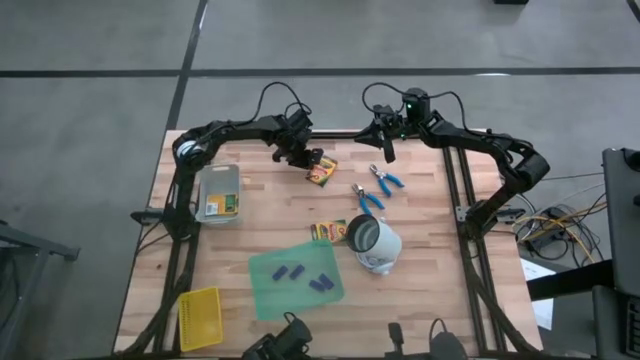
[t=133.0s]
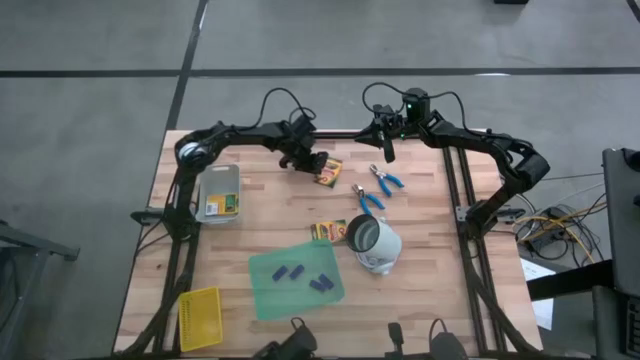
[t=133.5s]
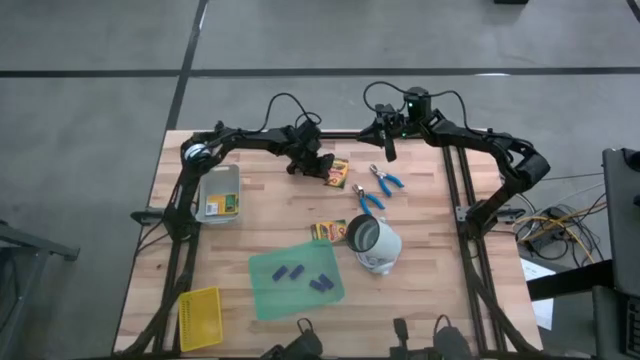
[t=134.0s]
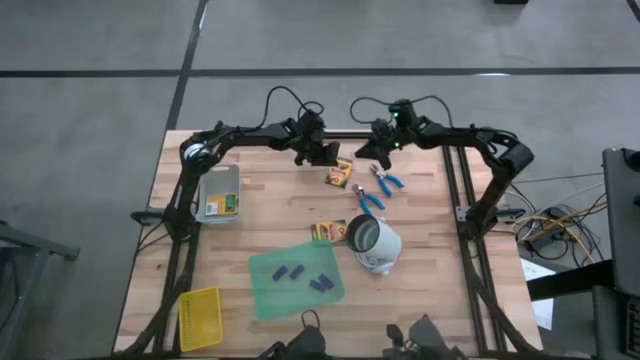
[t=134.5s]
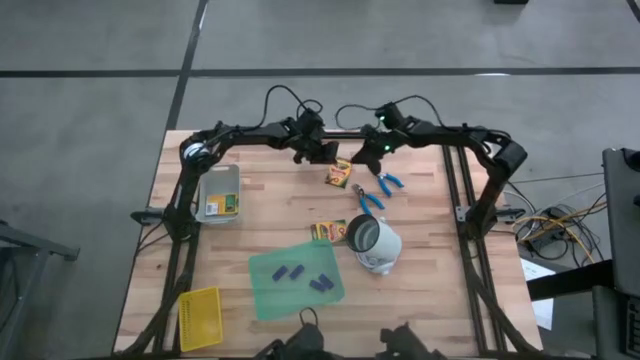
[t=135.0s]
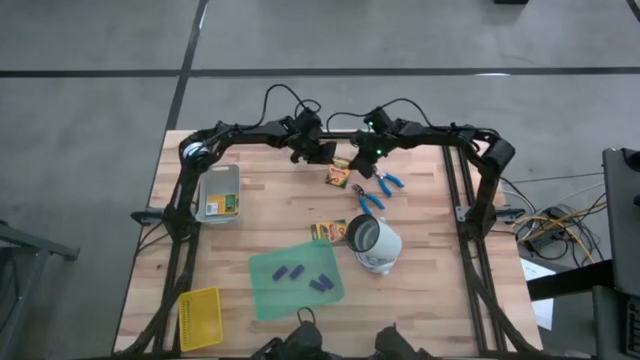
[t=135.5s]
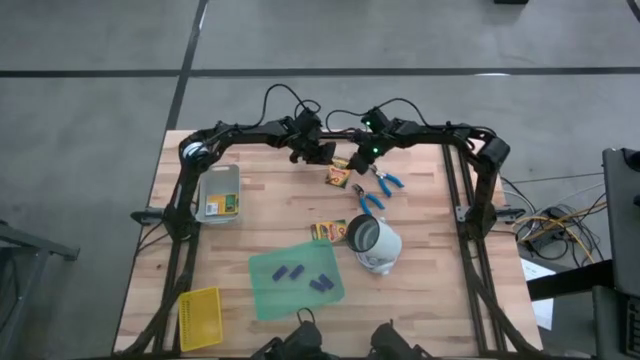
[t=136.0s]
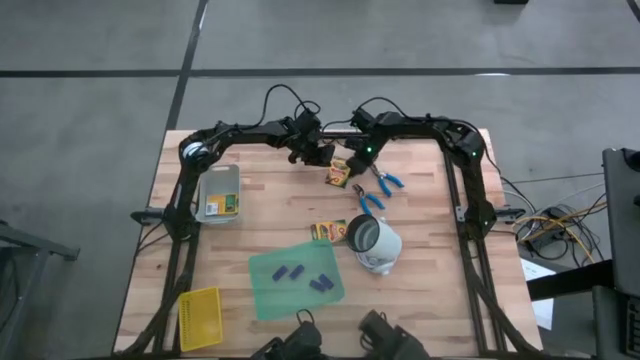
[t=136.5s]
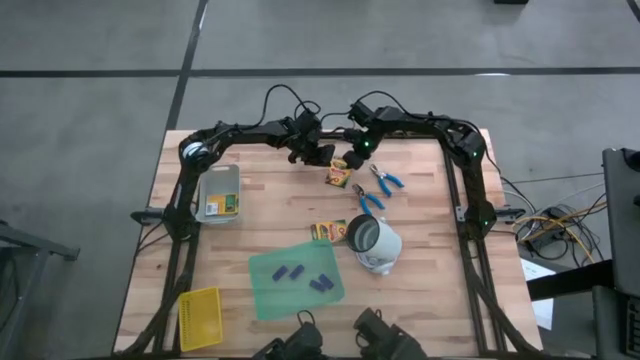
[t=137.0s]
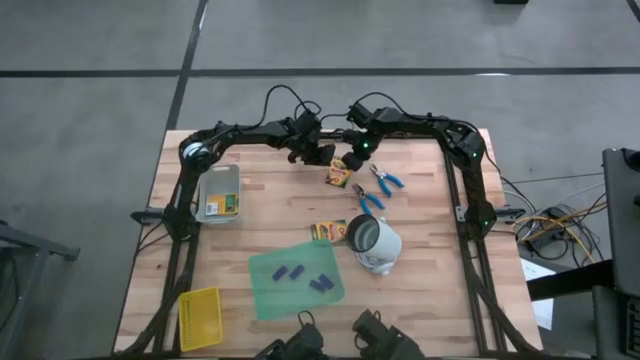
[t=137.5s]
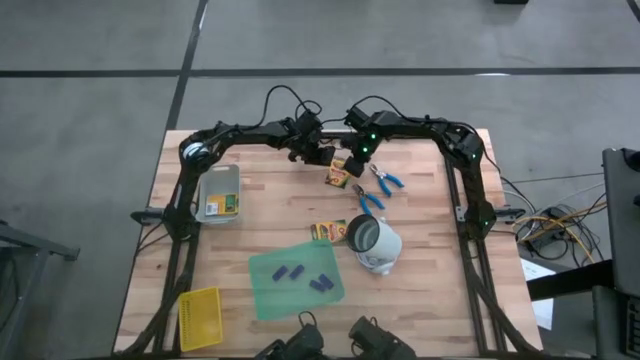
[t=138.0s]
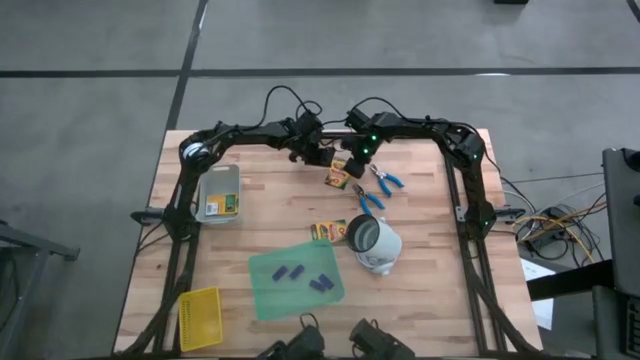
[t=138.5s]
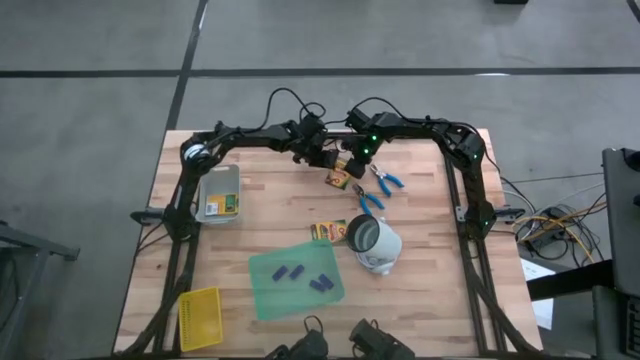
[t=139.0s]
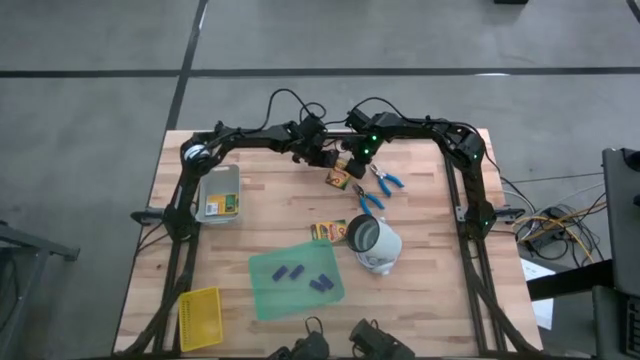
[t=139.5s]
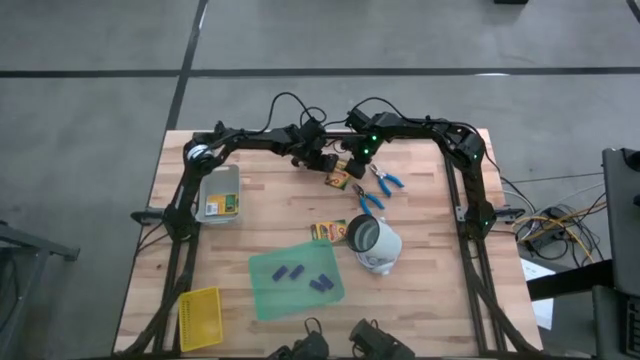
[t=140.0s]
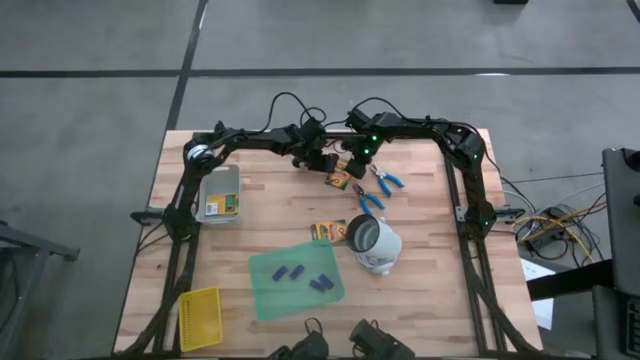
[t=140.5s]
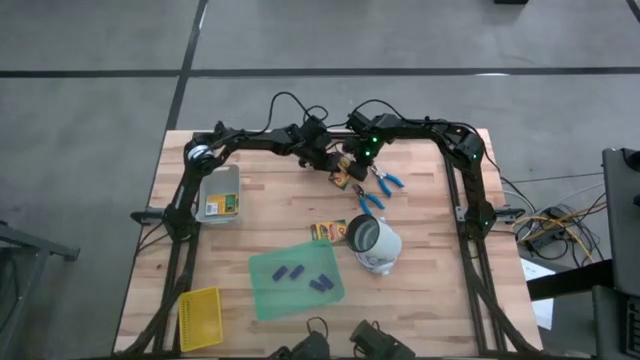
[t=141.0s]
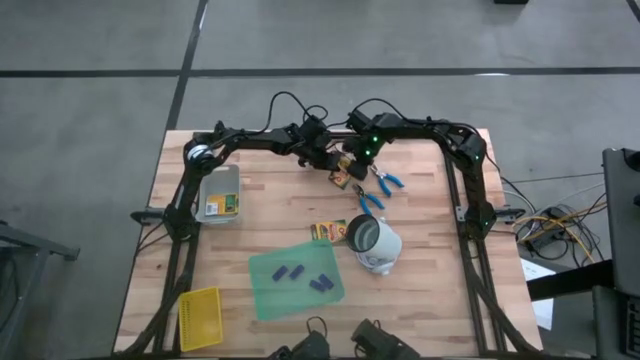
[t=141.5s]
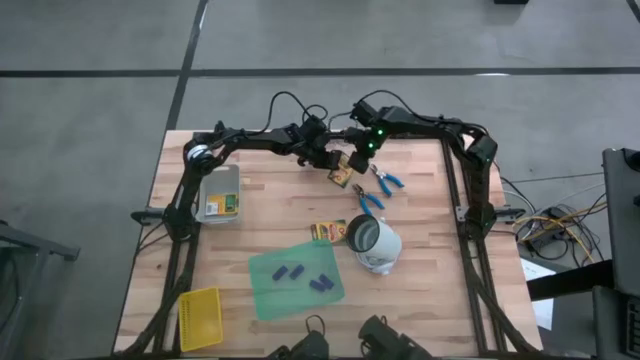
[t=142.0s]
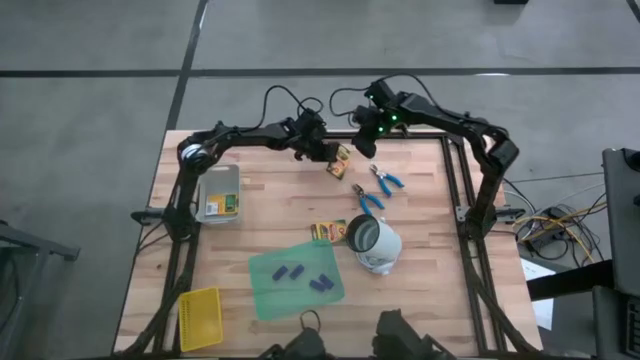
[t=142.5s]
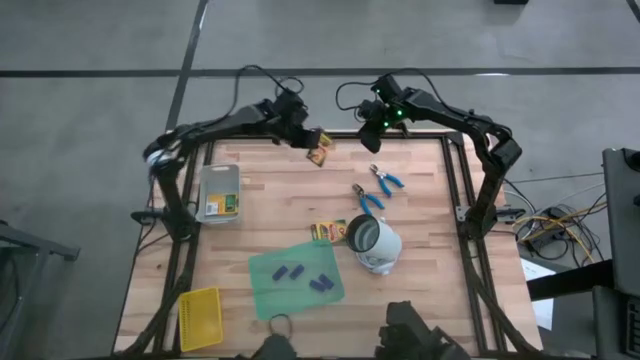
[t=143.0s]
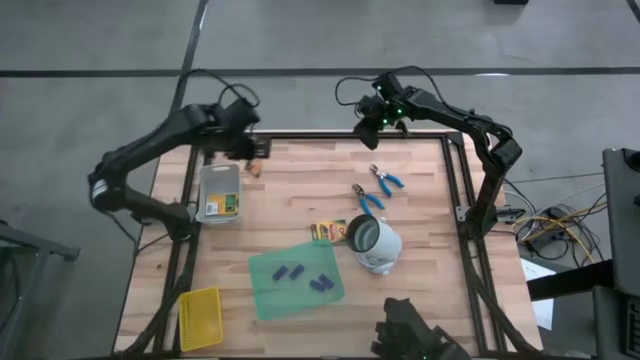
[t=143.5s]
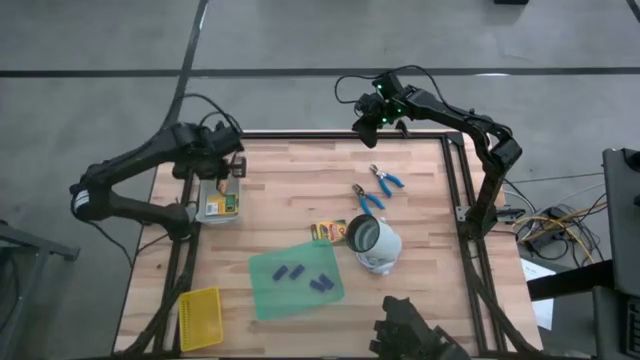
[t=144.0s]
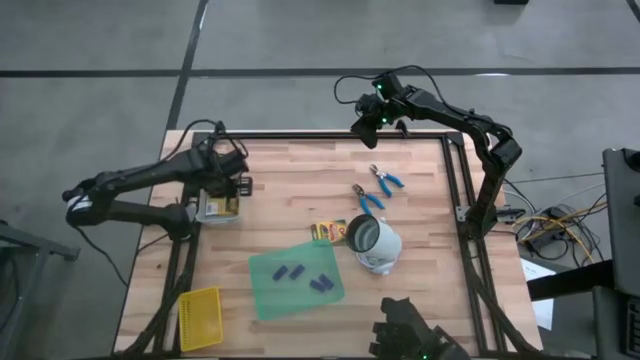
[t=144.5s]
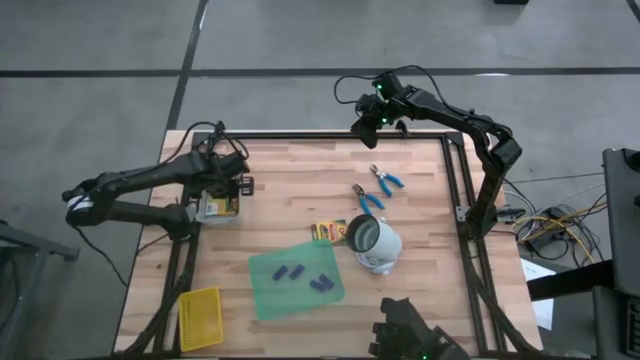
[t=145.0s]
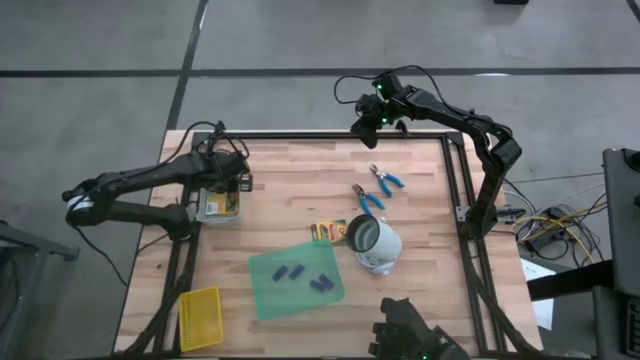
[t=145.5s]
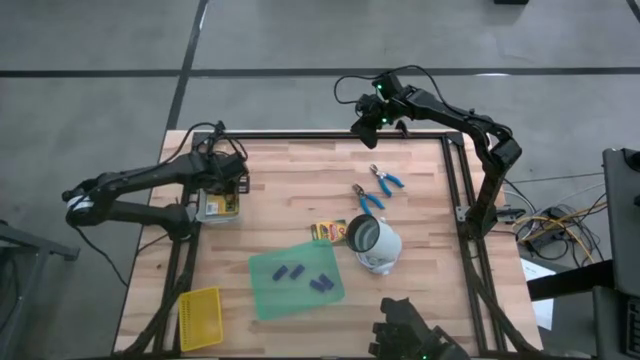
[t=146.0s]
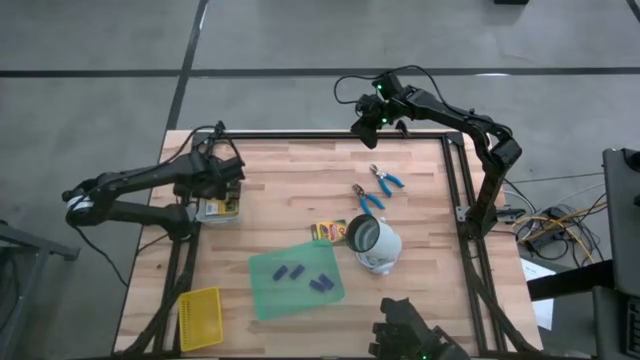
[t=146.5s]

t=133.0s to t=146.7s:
Task: Pick & Place School Supplies
Put the yellow crayon box into the gray bin

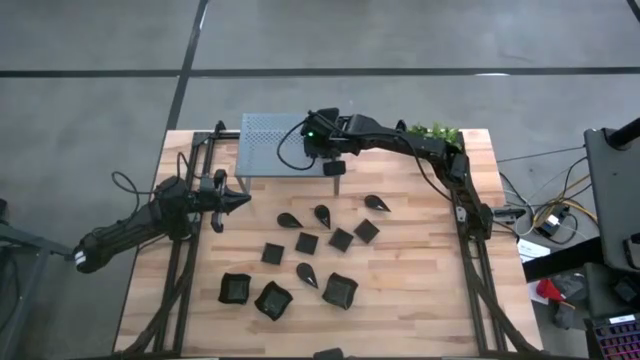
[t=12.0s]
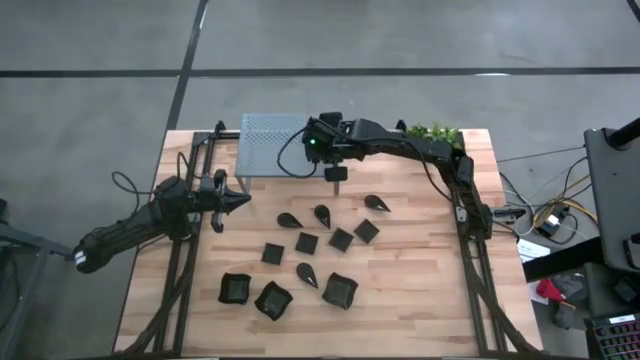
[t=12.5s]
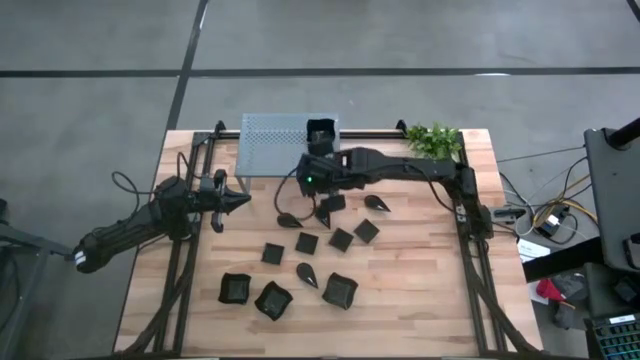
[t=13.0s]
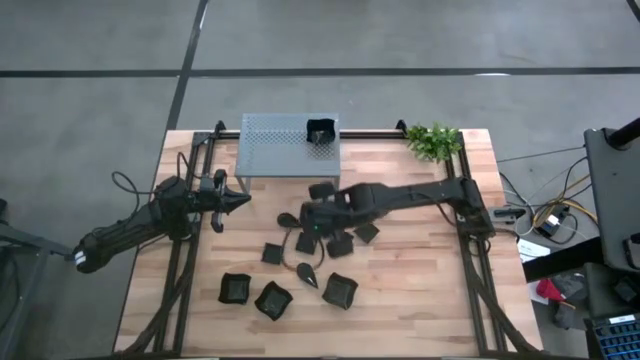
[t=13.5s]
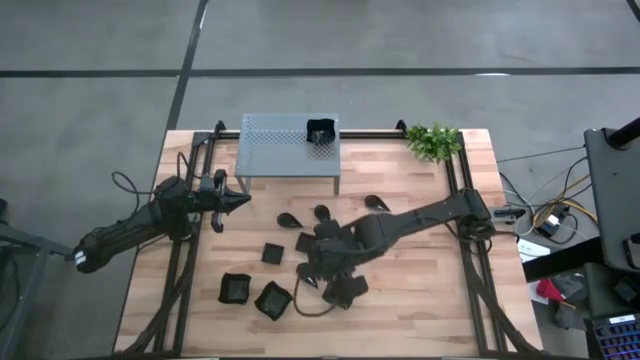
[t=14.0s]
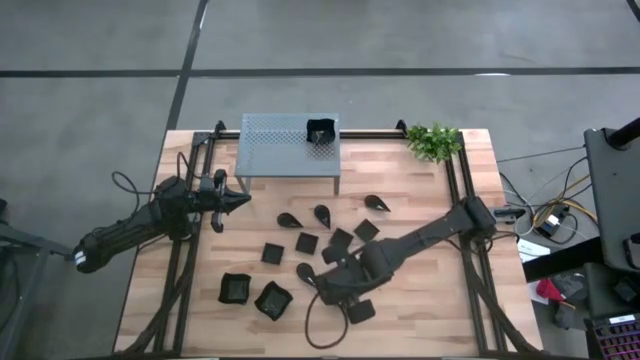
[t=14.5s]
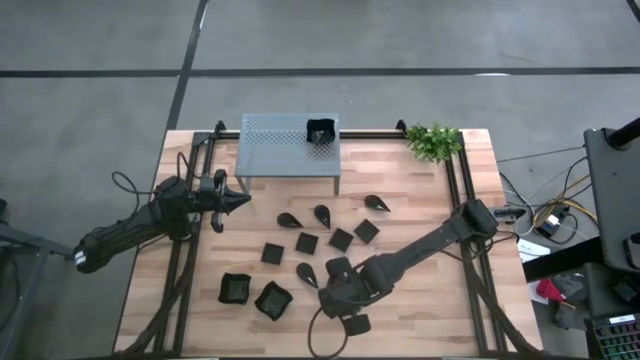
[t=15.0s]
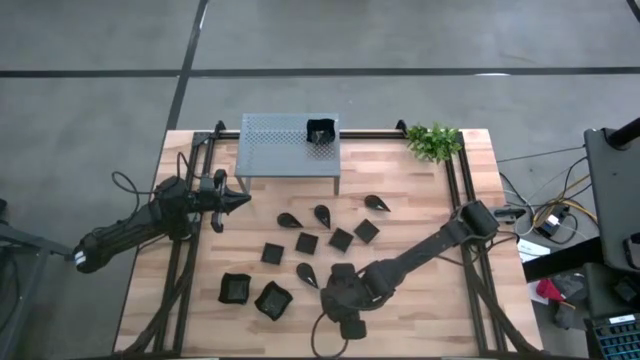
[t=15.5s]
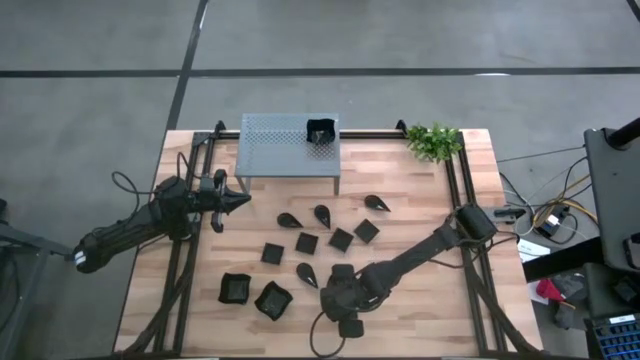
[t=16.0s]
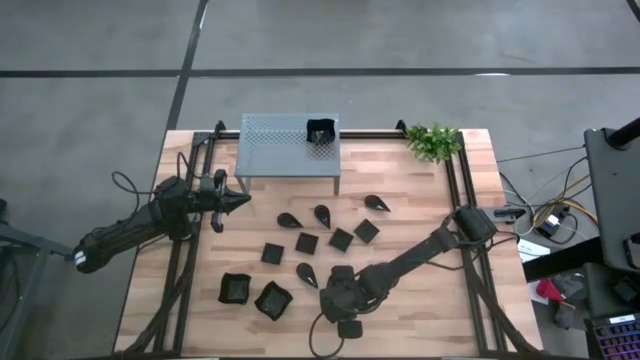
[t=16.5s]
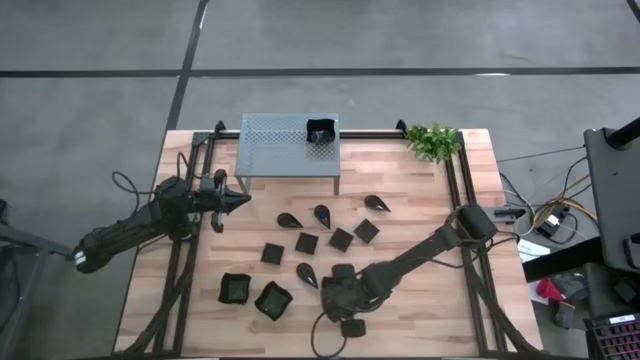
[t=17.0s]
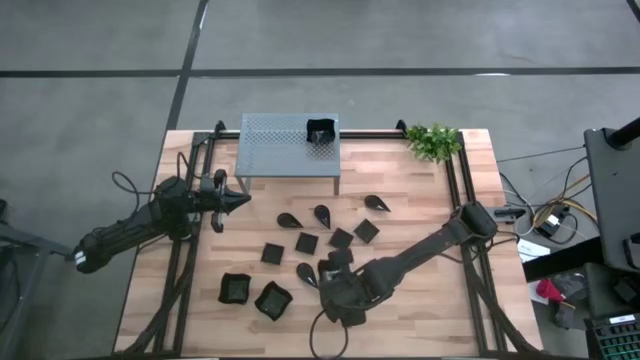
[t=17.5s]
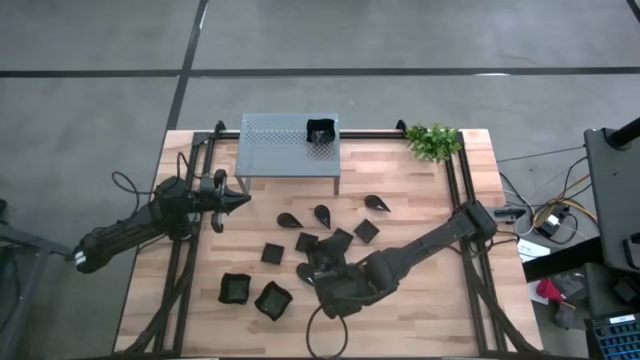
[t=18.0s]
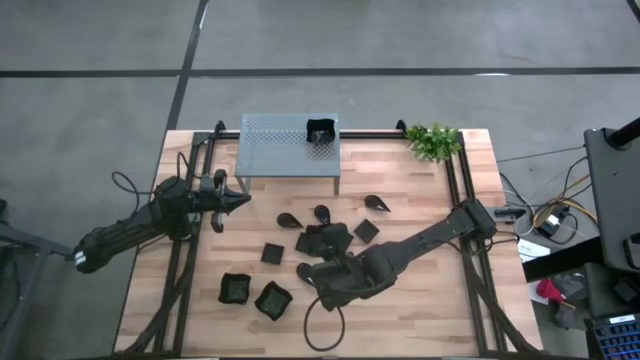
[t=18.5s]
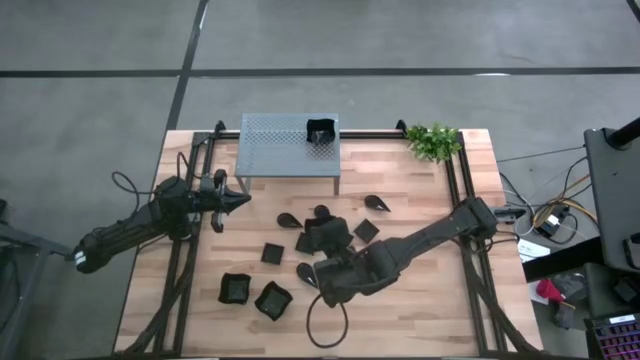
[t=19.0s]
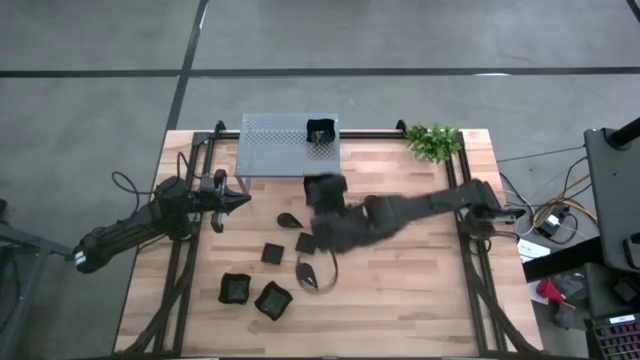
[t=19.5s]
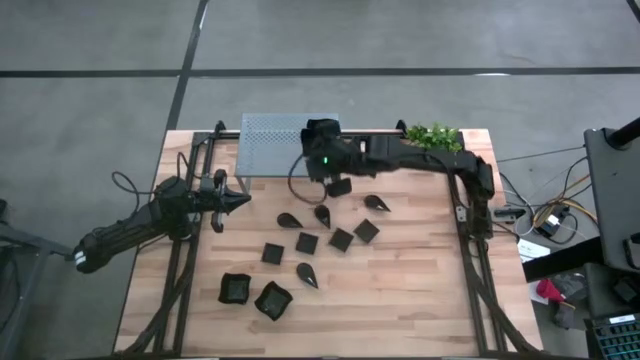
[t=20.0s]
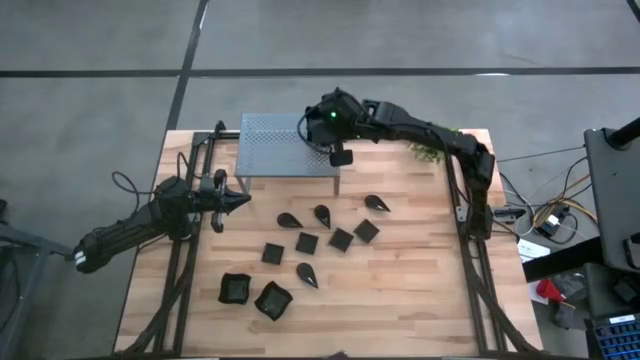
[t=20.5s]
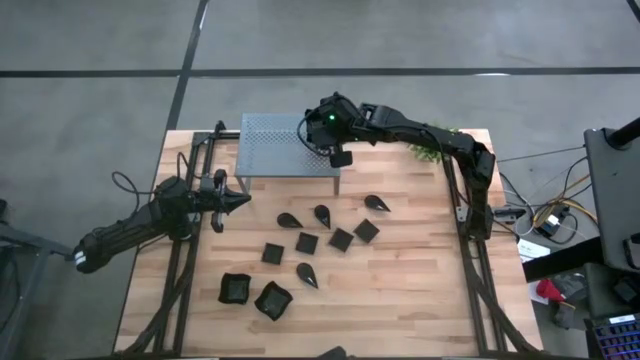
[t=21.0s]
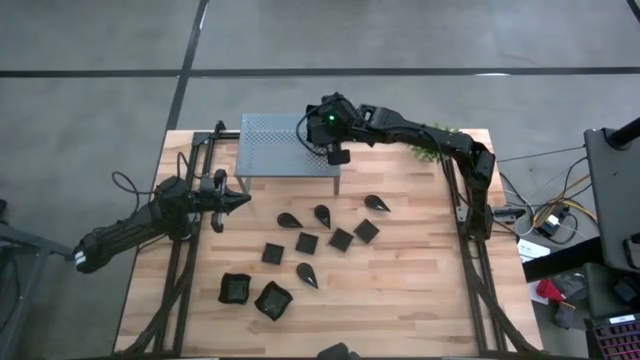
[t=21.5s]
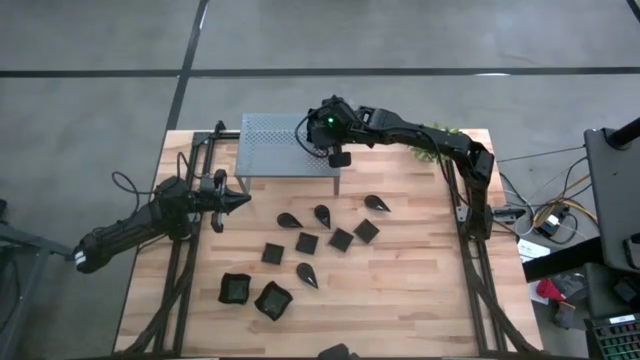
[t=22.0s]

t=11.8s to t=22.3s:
Task: Pick & Place Mini shaped plates
Stack the black distorted square plate on top of the other black distorted square plate on the shelf
